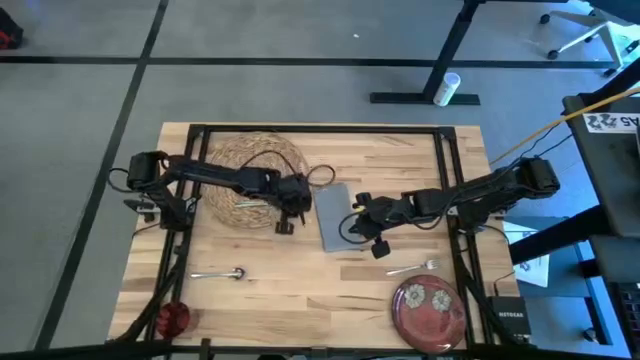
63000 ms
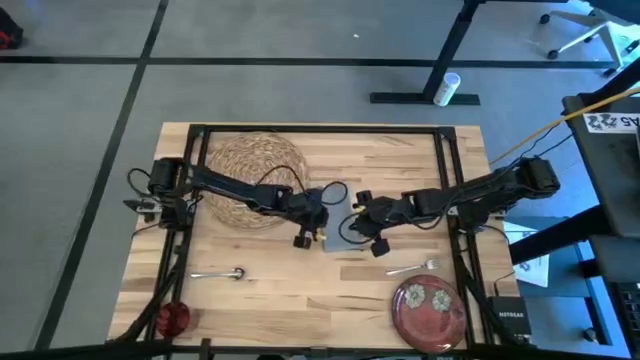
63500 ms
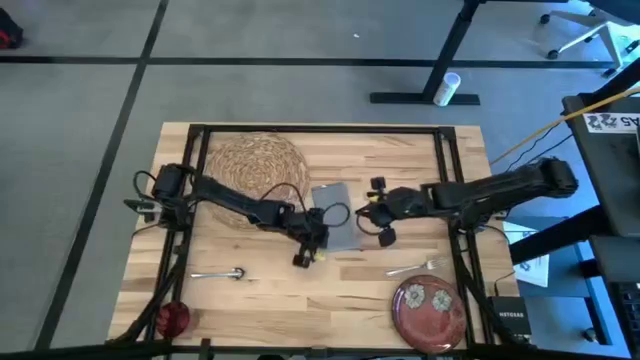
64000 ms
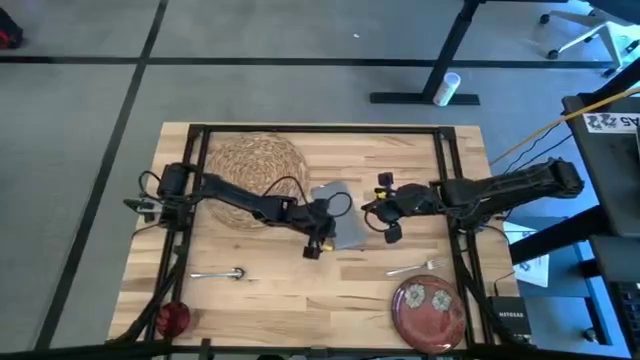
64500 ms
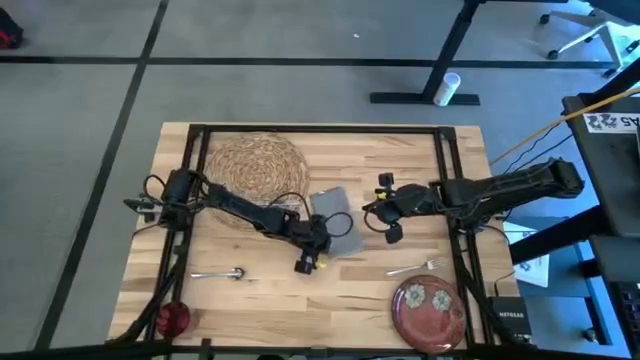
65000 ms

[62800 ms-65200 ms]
Task: Set table place
Move the gray table napkin to the bottom left of the table

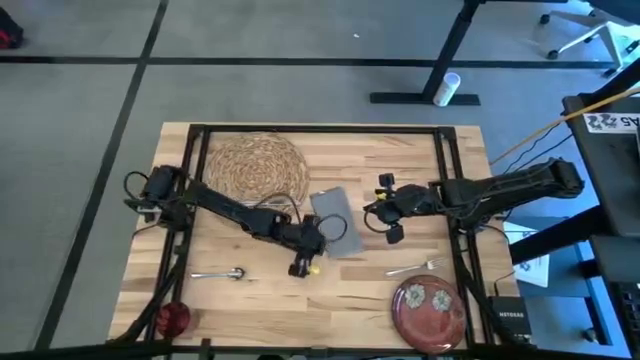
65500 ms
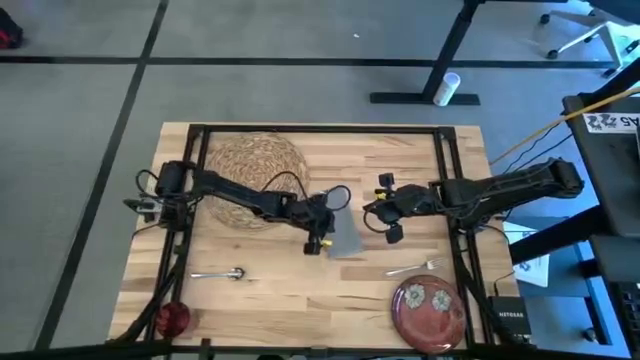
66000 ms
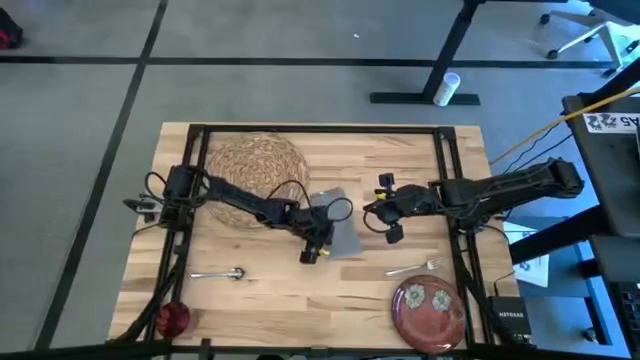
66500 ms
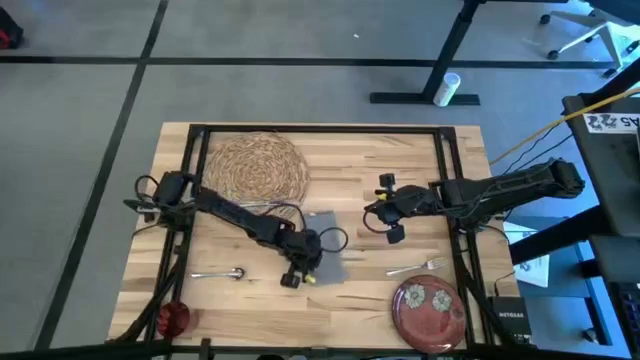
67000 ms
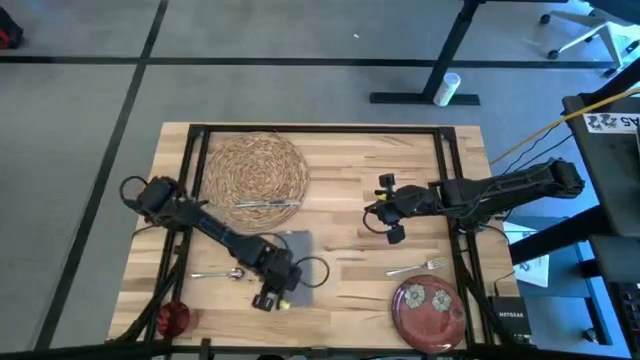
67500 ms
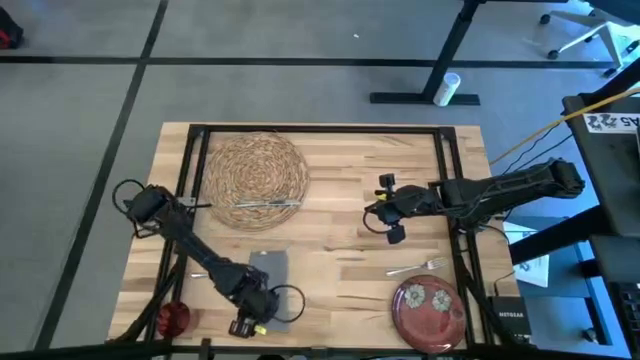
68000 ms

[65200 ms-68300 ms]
Move the gray table napkin to the bottom left of the table

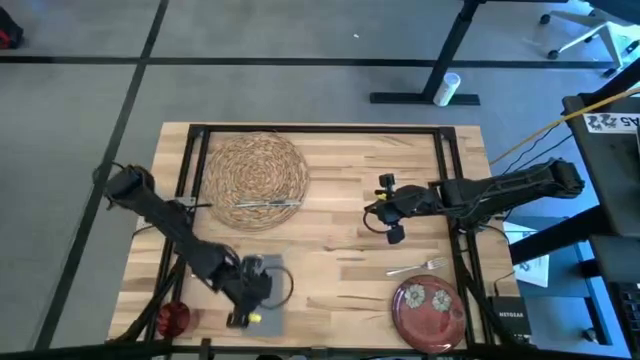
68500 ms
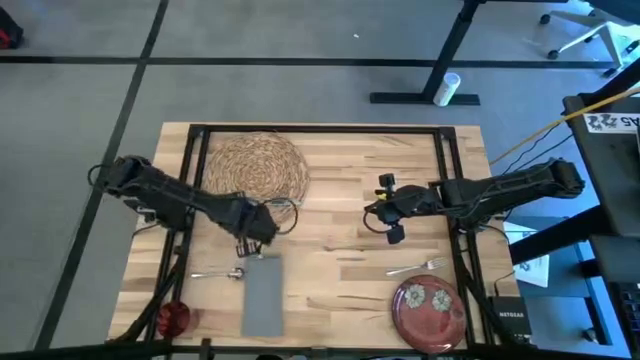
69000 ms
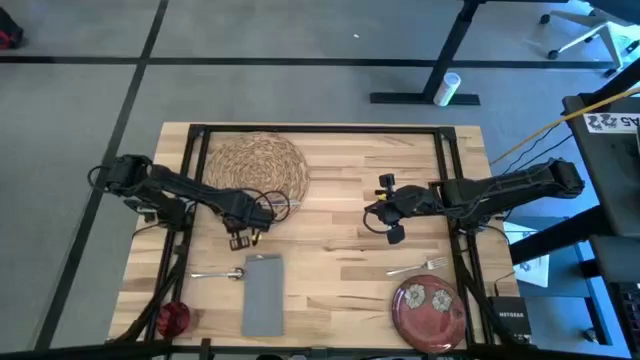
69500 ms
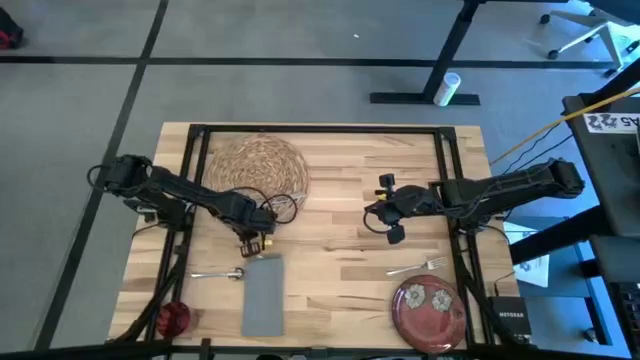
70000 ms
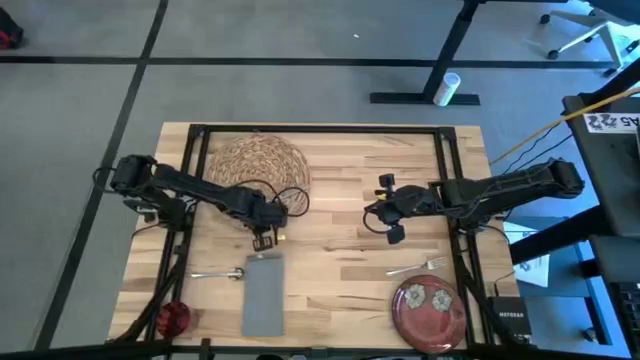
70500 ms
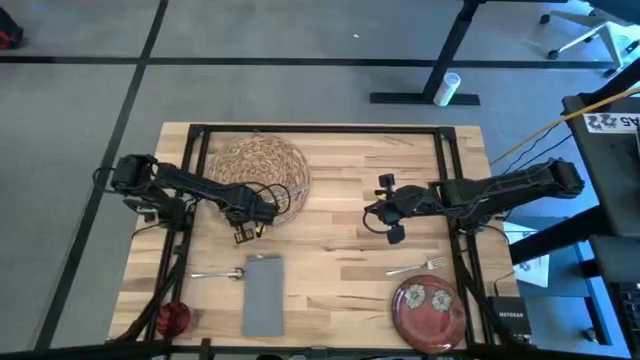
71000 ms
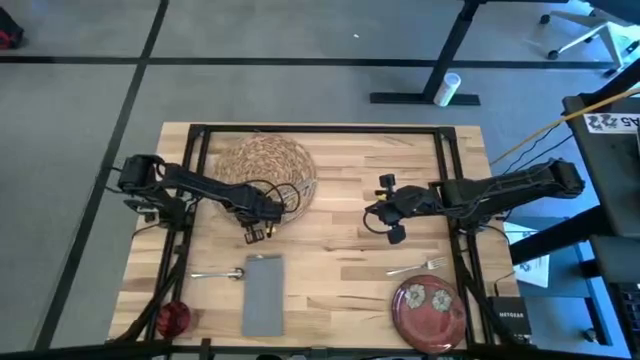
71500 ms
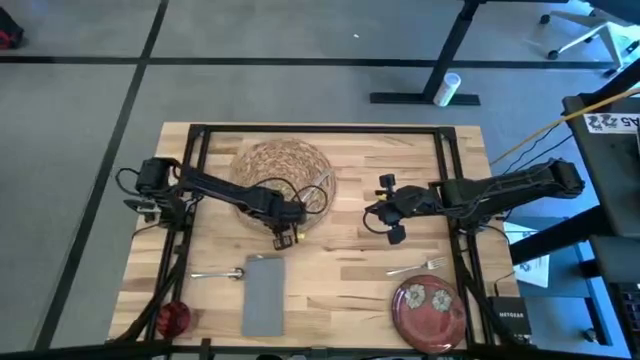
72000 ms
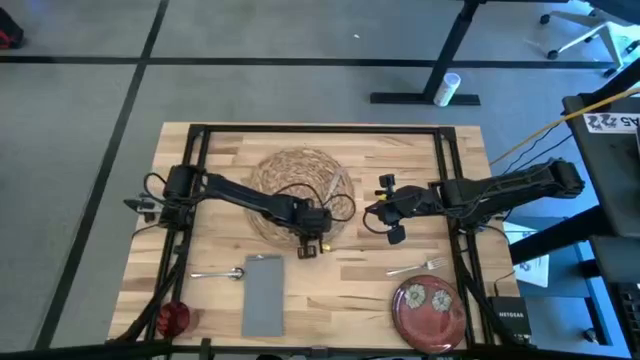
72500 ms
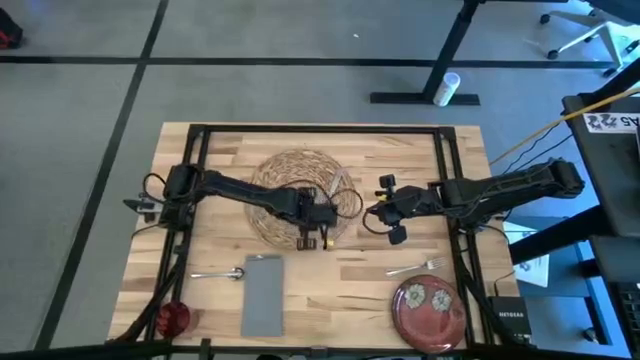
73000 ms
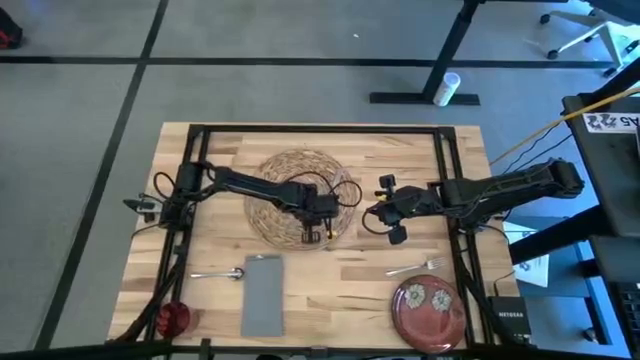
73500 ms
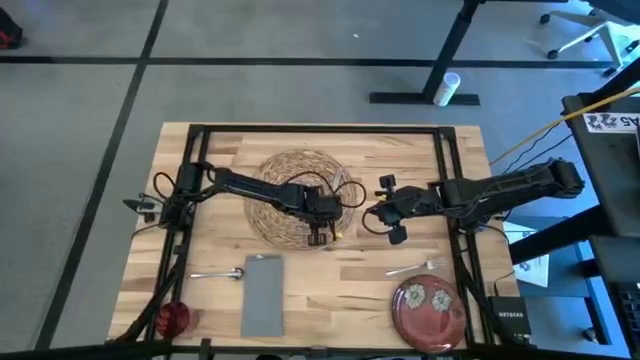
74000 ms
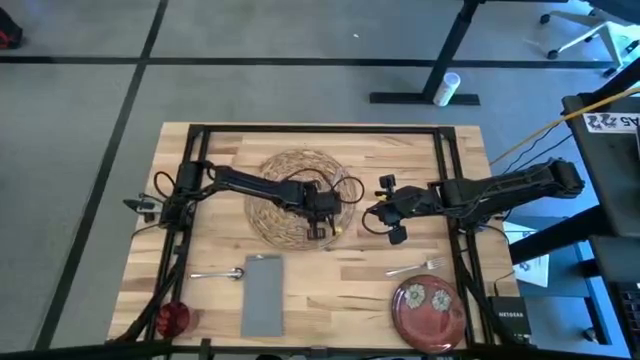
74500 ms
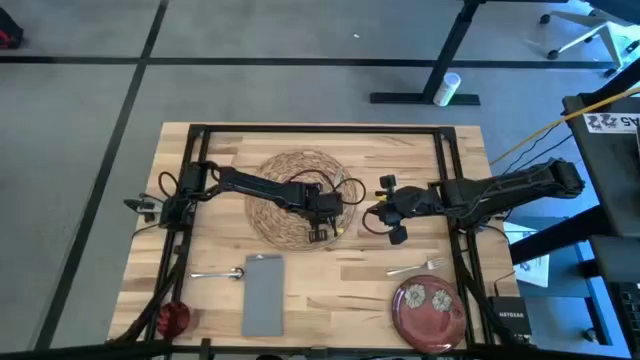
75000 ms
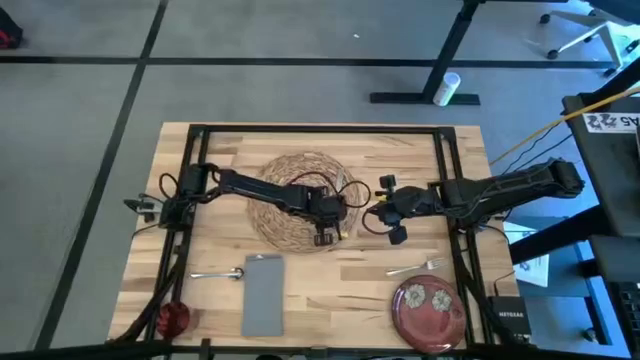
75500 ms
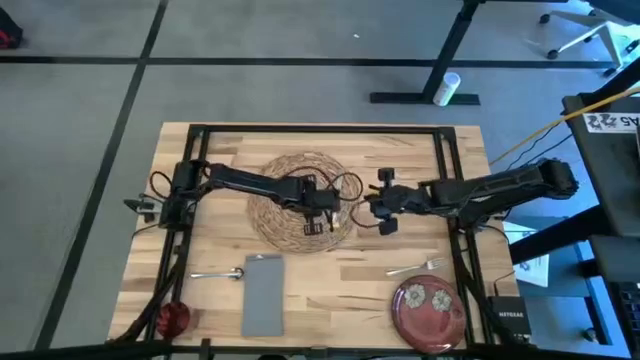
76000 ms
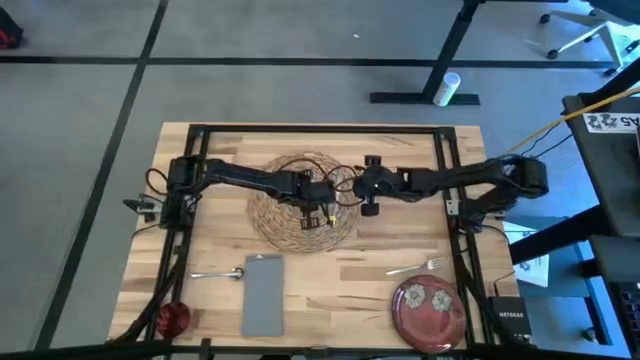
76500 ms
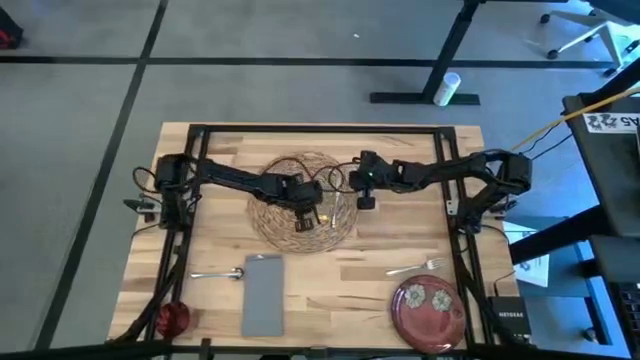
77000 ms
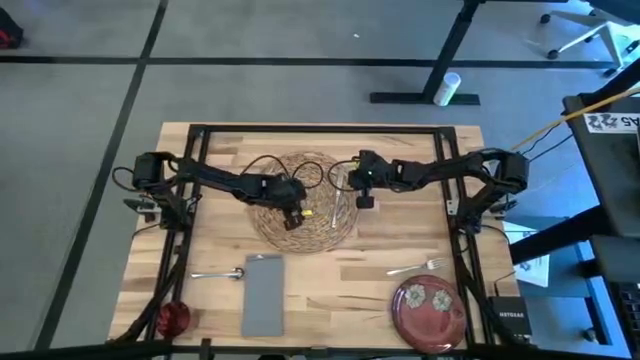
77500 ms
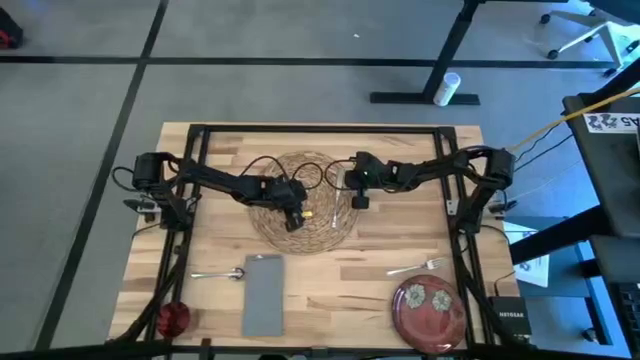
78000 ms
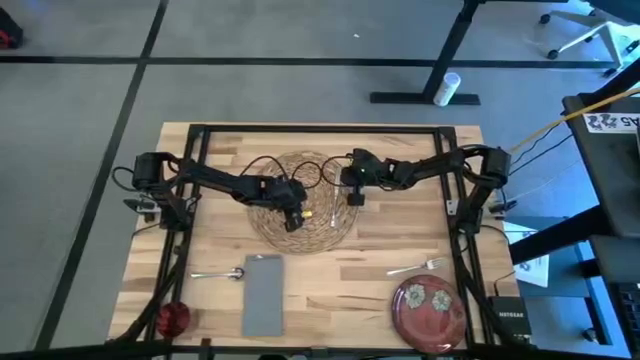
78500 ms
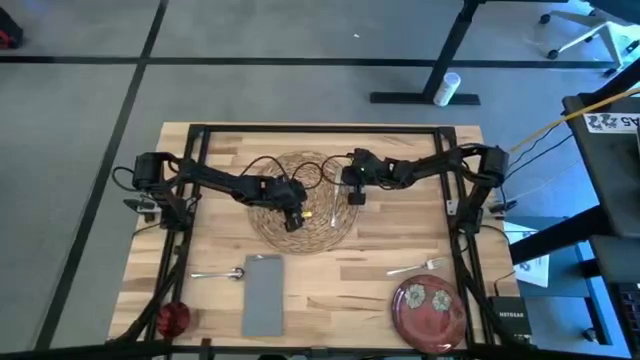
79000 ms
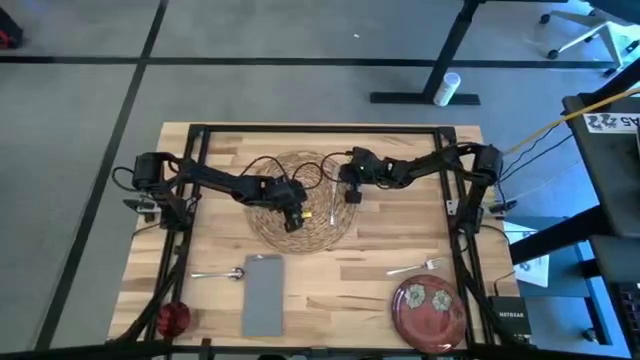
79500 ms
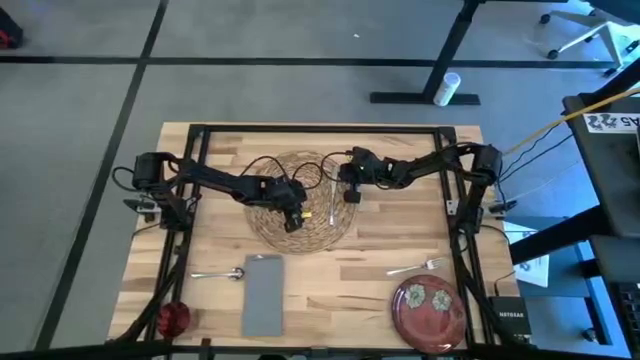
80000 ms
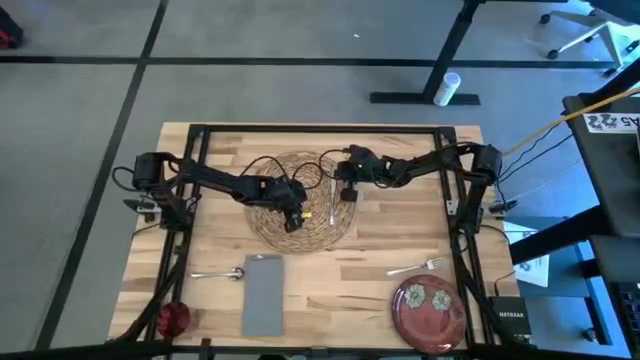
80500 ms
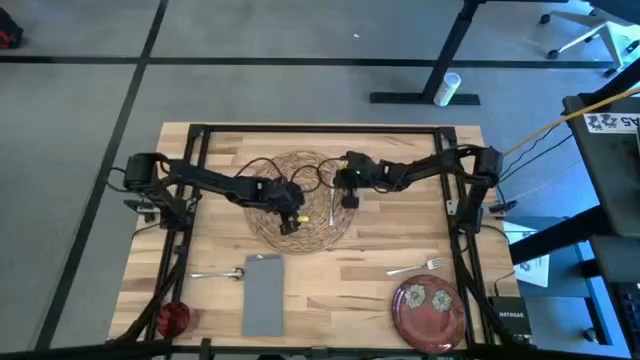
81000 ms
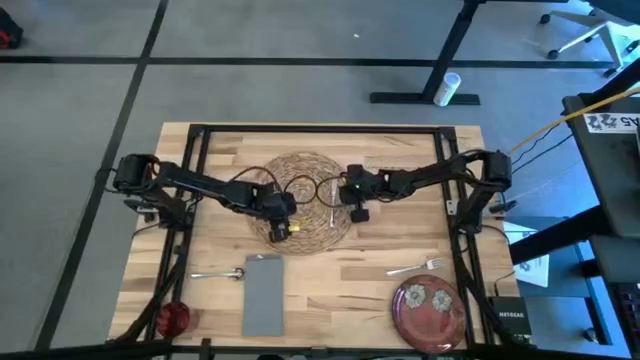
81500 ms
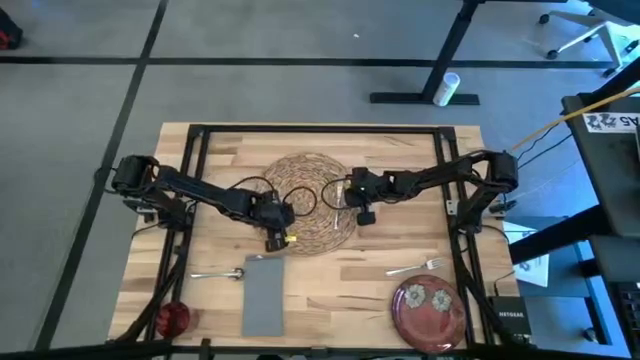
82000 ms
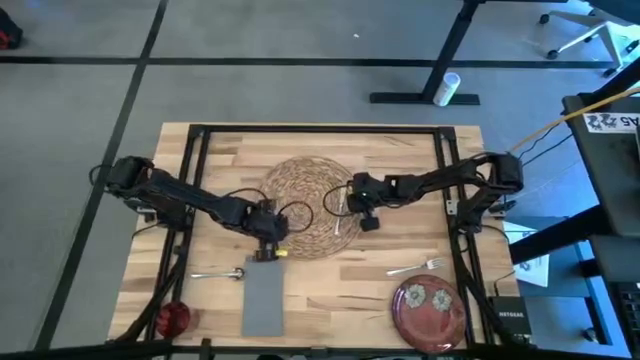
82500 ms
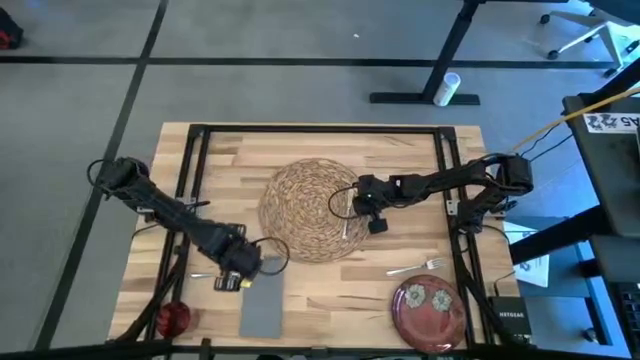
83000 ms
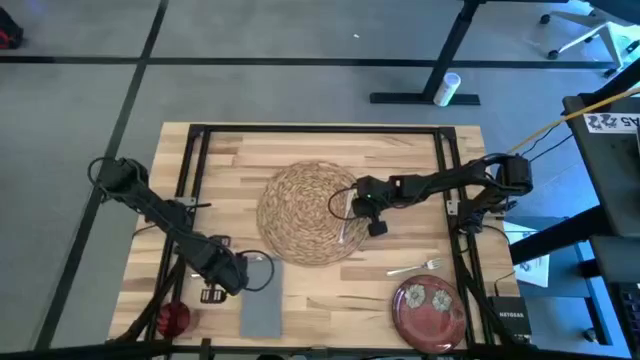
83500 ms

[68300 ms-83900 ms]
Move the brown placemat to the center of the table
